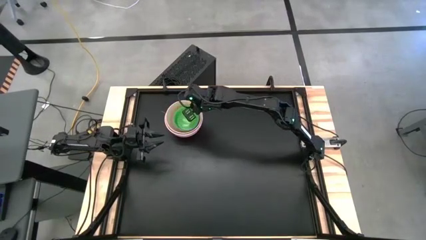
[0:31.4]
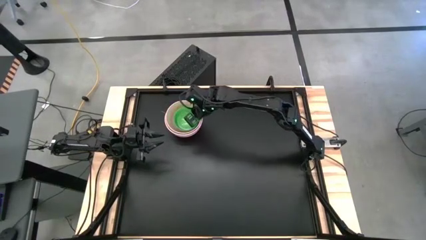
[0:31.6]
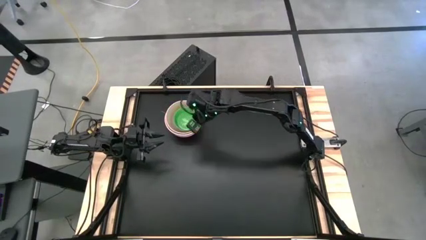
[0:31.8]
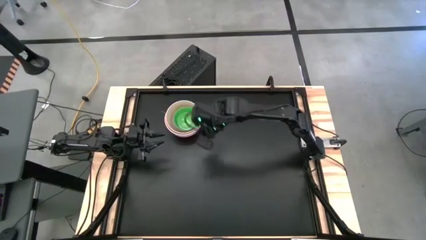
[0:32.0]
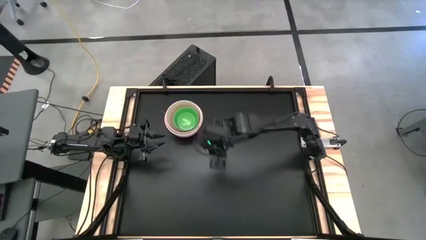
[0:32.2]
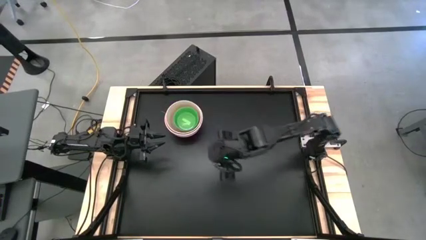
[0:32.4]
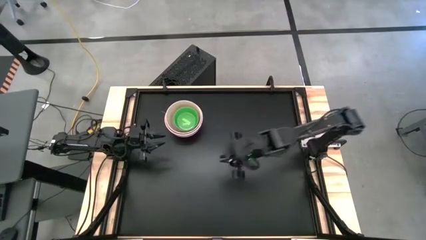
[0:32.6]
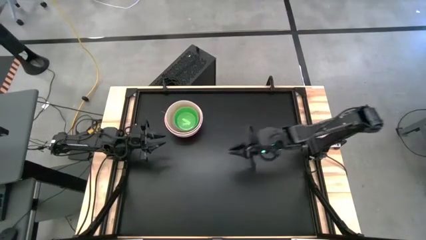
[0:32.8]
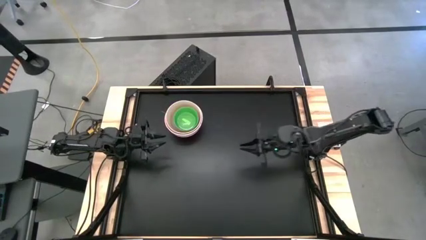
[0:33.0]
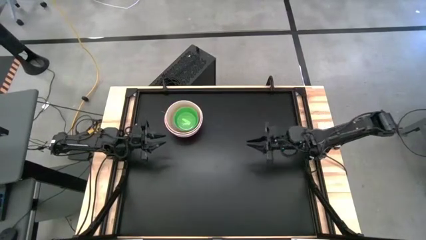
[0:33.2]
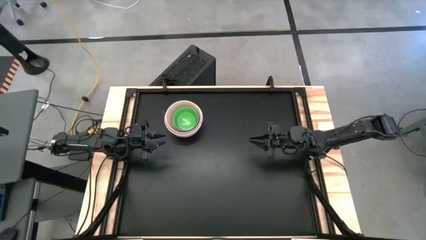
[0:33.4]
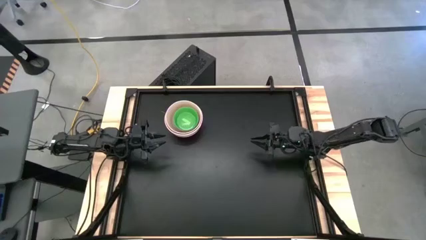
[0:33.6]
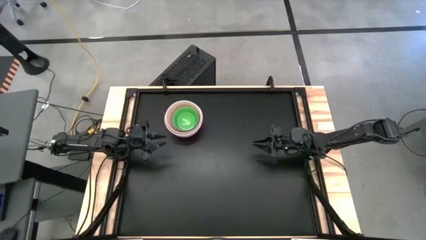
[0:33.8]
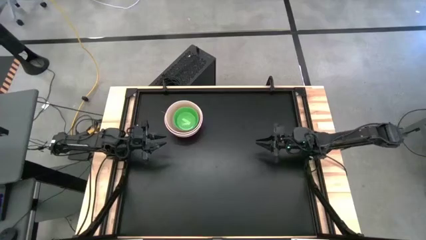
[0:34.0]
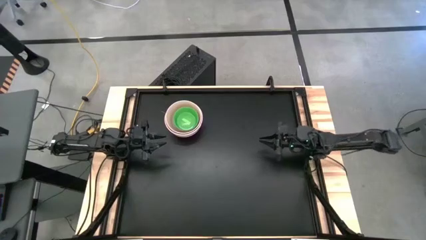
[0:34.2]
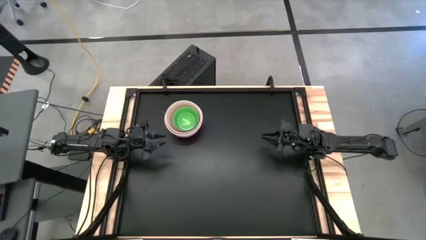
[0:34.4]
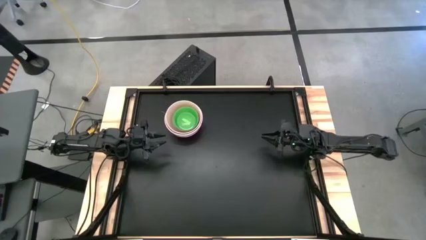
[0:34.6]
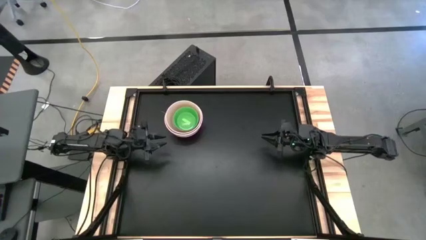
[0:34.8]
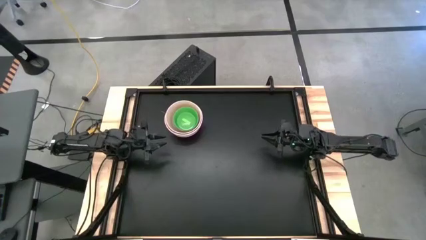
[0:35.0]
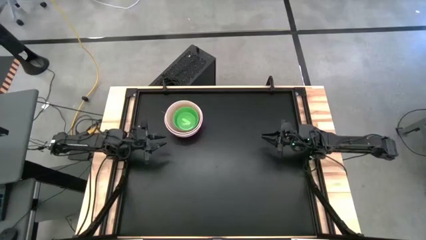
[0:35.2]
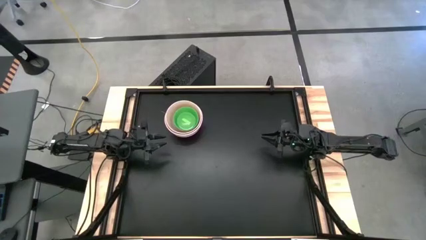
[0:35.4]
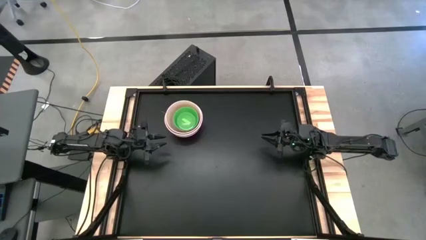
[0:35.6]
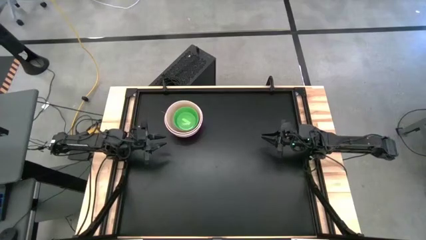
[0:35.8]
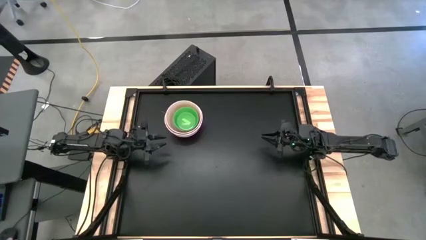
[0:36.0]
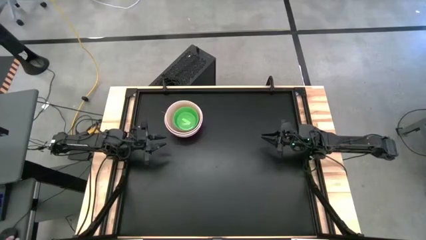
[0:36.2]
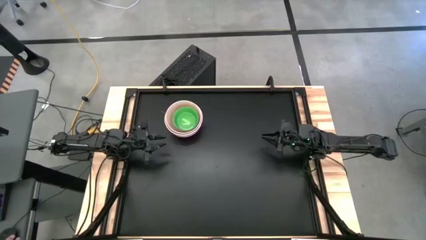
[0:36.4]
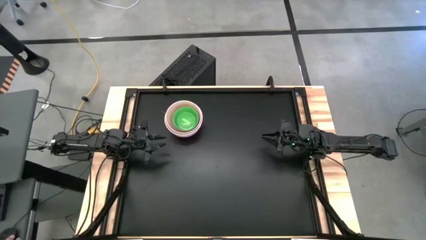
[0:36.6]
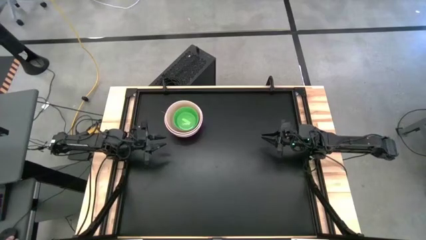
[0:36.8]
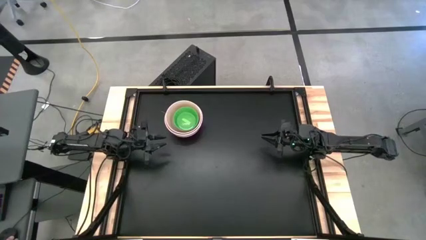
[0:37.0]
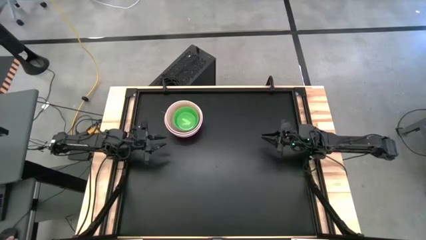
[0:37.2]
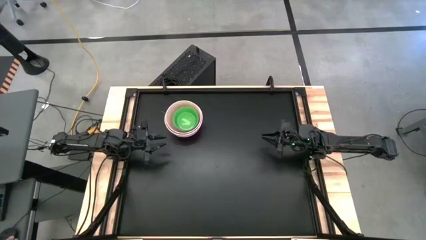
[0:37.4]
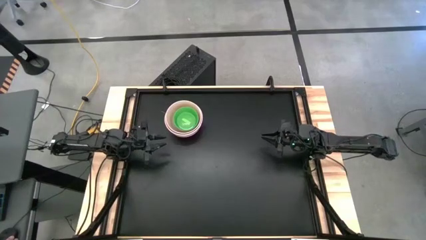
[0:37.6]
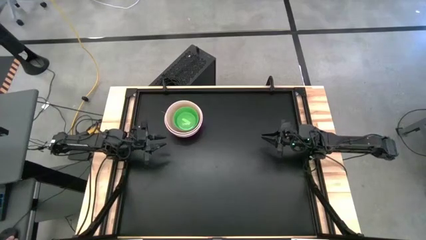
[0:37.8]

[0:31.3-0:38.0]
Return to Home Position

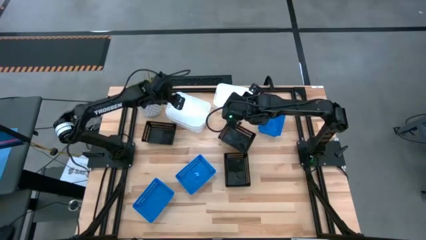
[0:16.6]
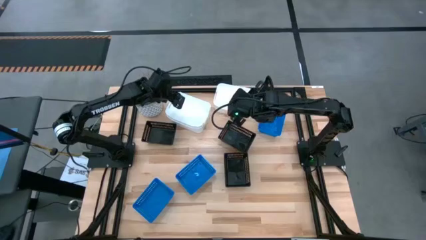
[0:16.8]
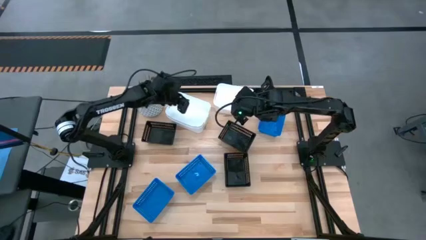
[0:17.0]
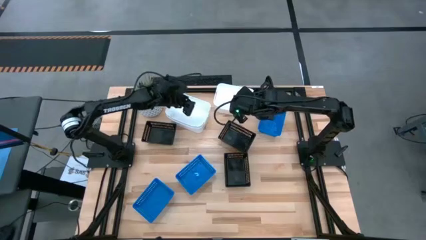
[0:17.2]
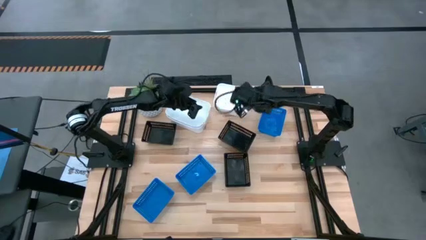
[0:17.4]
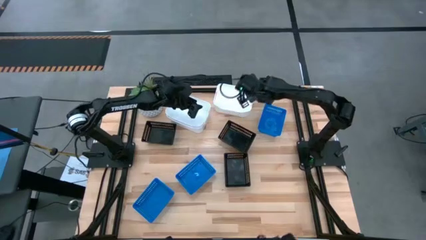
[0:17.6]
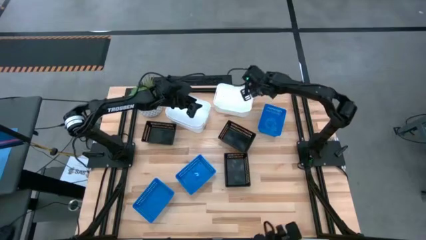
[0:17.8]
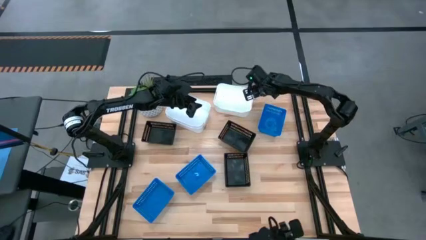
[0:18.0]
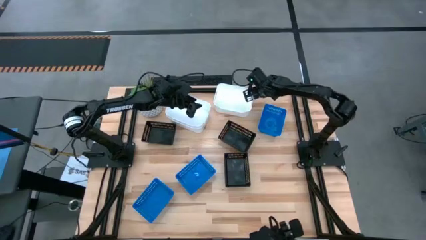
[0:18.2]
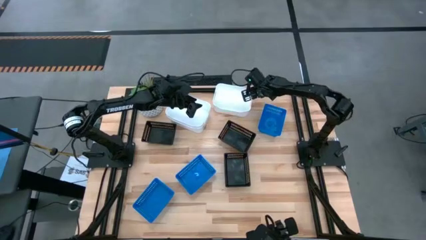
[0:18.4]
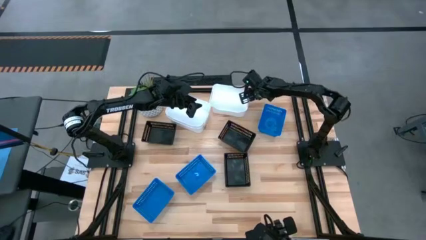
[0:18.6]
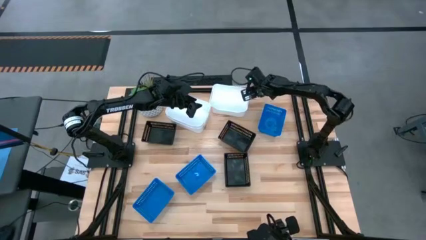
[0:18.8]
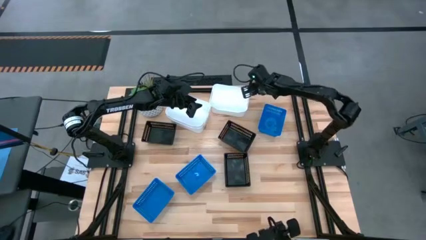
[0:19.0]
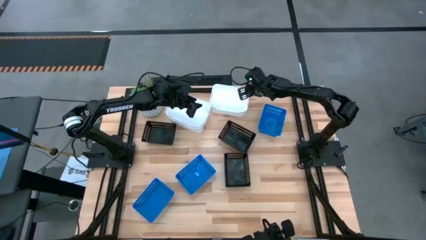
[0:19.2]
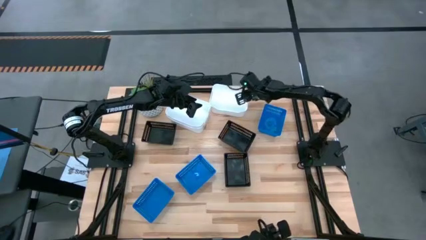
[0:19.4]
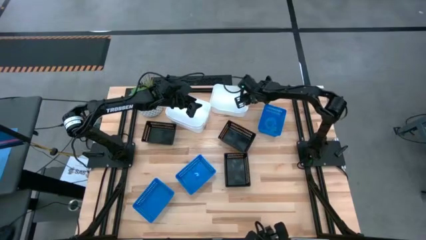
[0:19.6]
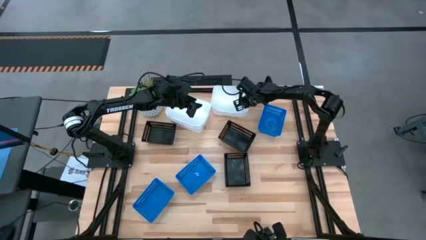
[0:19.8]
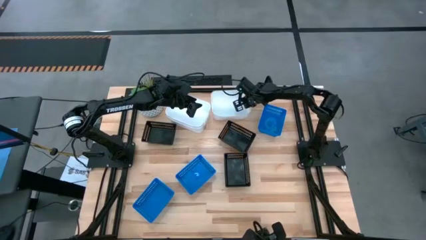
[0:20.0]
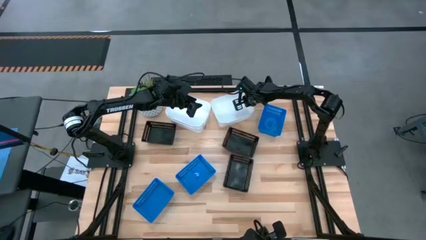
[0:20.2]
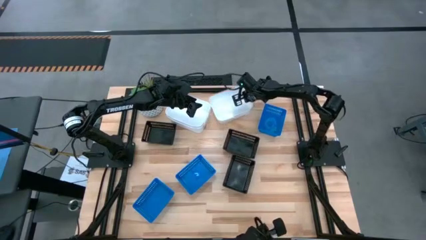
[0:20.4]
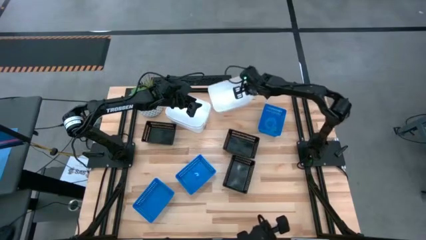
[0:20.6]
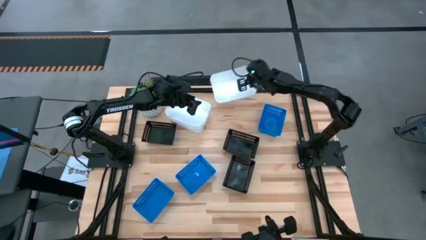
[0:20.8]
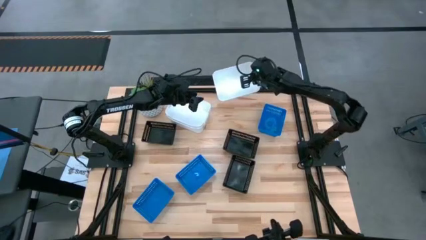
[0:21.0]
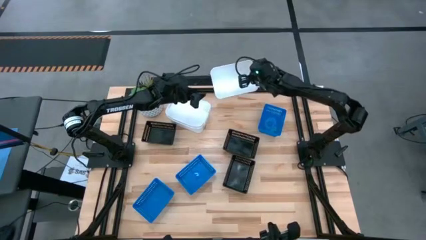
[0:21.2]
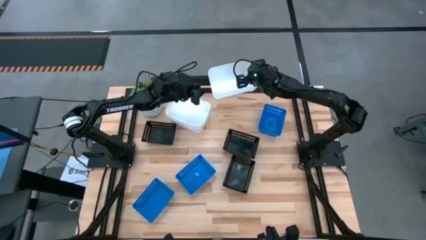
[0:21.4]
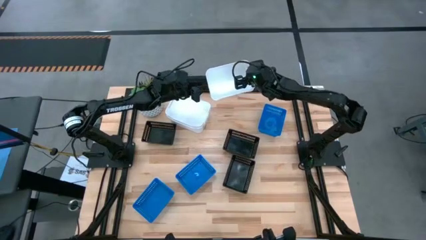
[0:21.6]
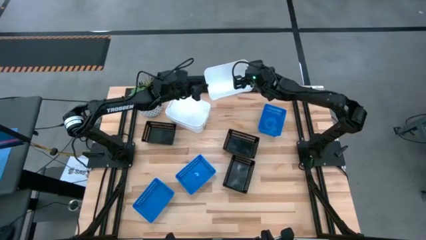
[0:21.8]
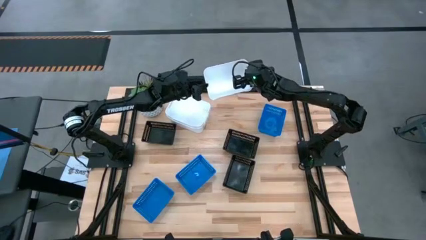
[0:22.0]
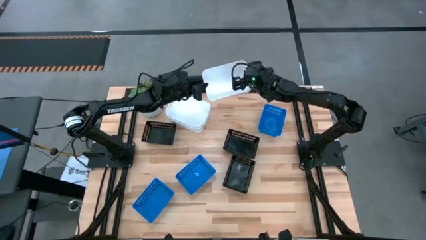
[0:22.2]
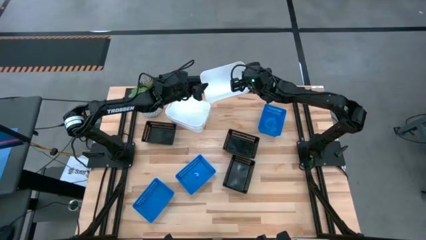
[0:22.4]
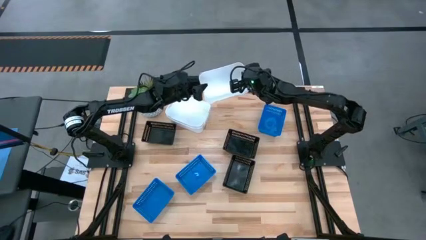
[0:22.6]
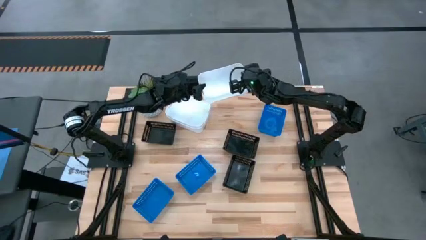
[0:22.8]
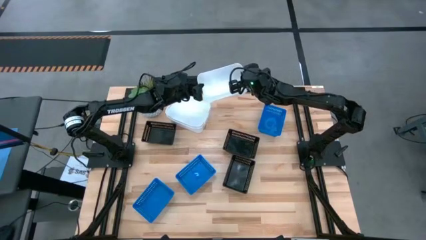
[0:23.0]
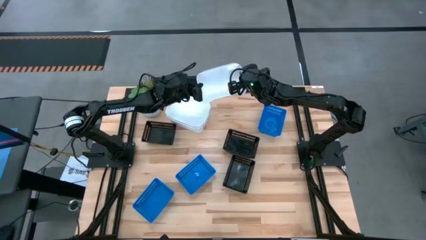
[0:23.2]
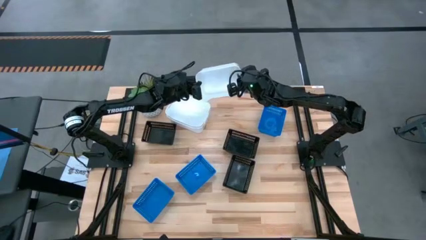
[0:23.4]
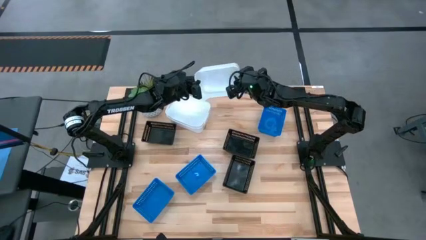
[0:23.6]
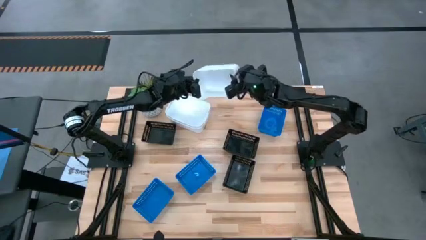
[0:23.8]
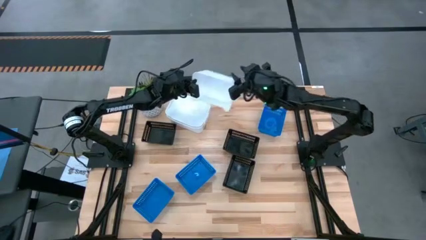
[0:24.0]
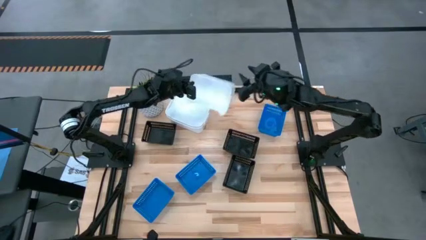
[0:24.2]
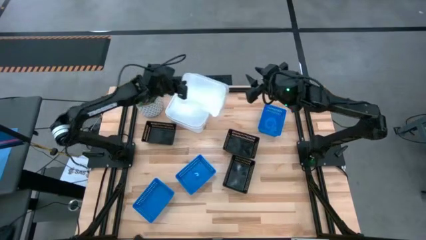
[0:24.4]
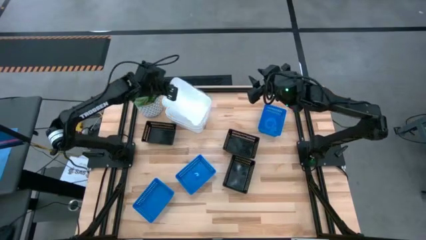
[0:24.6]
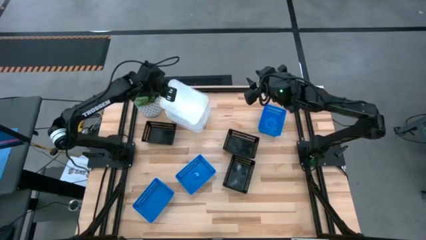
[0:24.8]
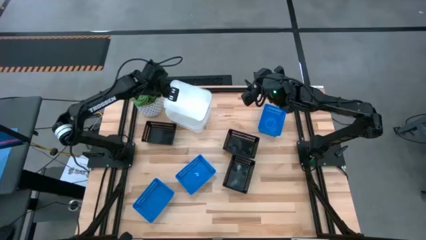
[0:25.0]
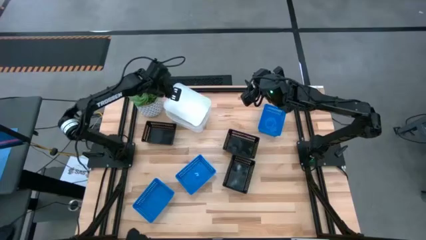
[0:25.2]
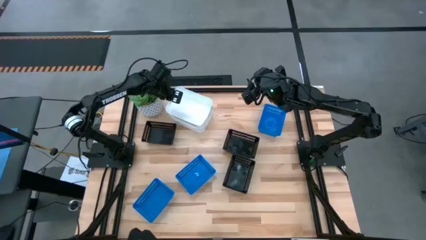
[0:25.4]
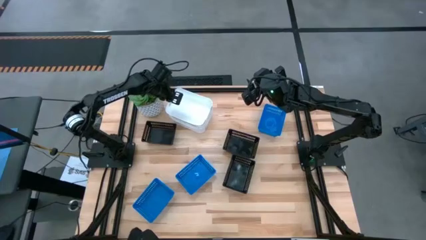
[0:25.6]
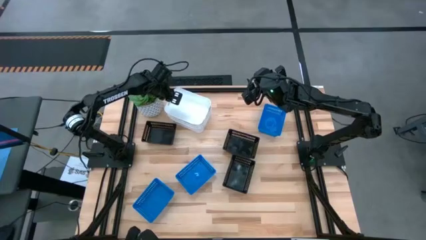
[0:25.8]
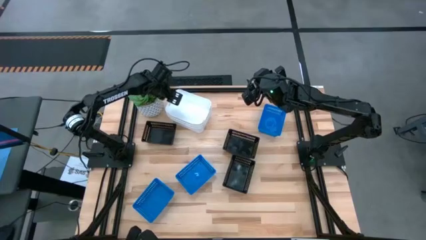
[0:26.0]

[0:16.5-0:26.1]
Stack the right white bin on top of the other stacked white bins

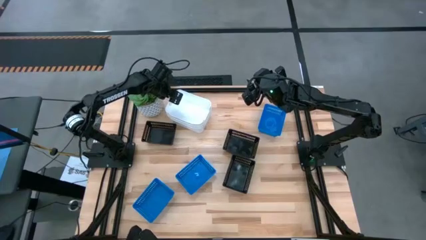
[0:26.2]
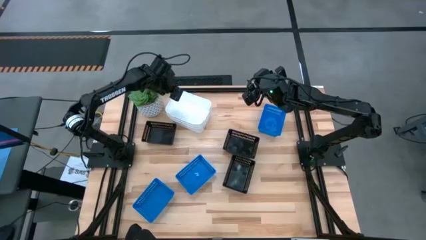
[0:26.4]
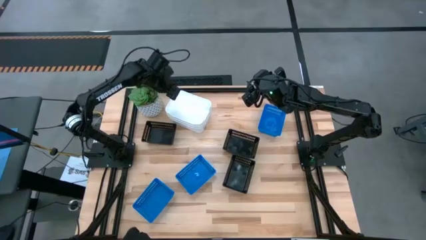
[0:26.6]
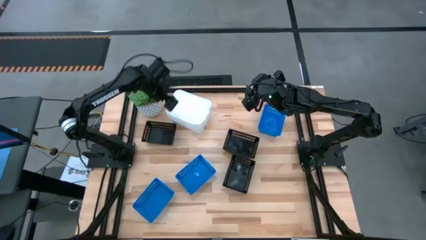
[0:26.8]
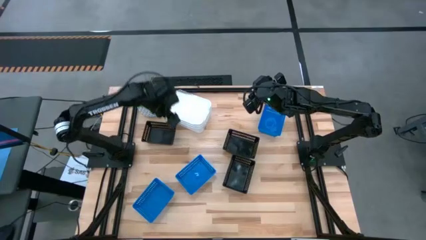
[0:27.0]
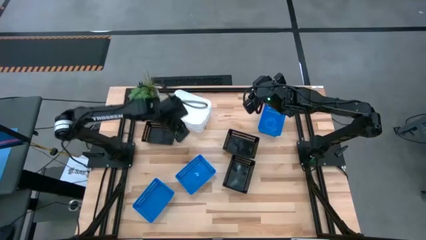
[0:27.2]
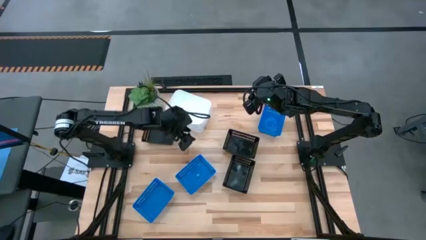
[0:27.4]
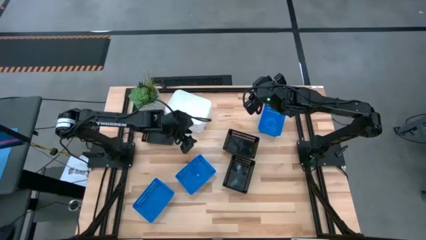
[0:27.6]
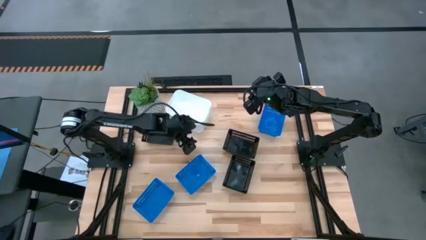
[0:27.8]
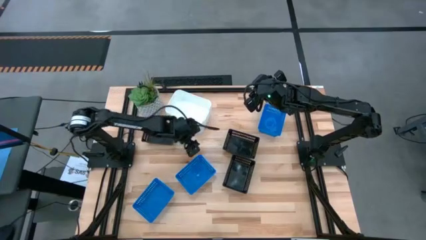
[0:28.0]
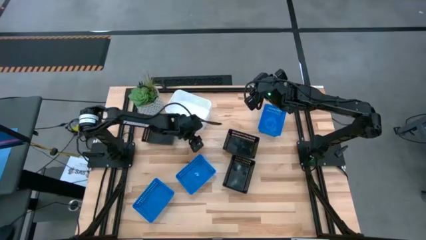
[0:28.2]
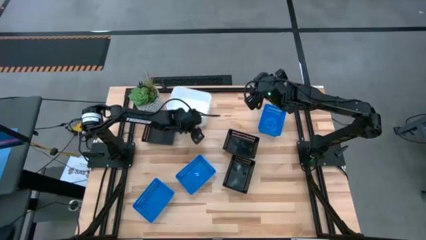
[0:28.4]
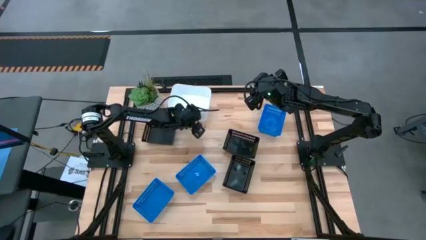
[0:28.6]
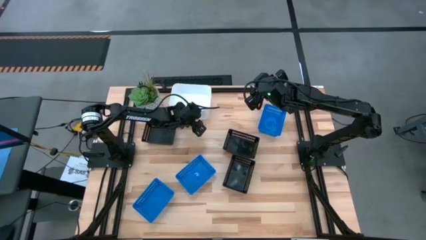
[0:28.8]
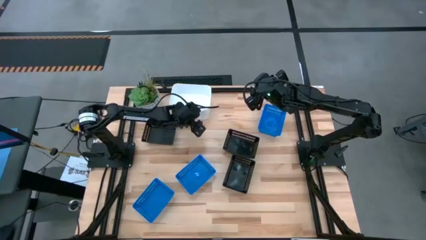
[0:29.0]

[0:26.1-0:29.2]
Adjust the stacked white bins
